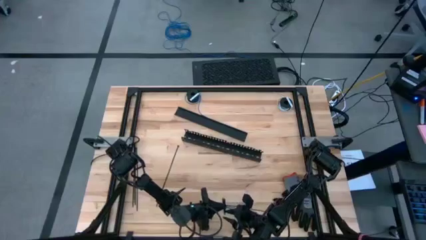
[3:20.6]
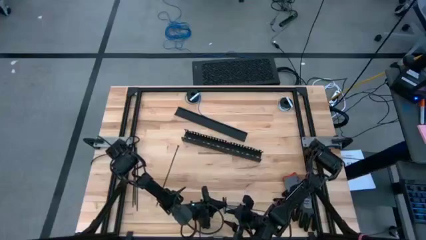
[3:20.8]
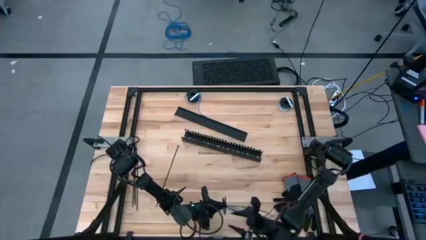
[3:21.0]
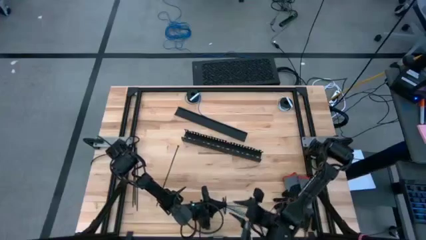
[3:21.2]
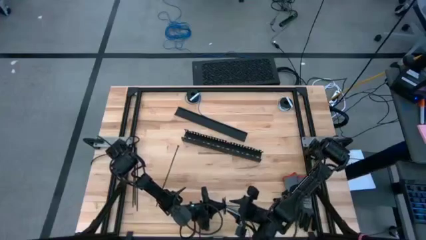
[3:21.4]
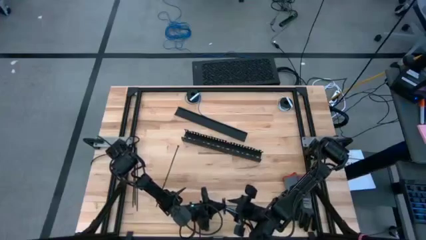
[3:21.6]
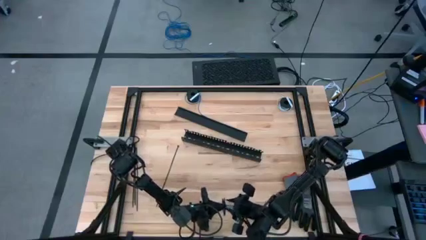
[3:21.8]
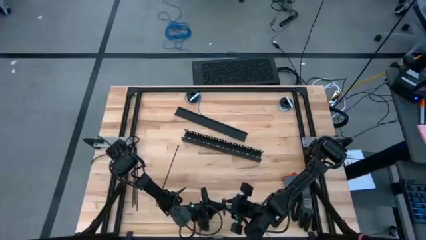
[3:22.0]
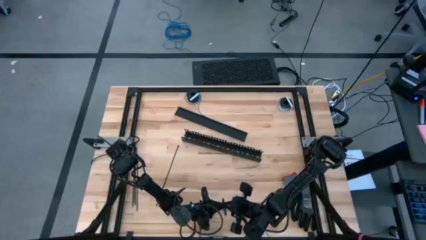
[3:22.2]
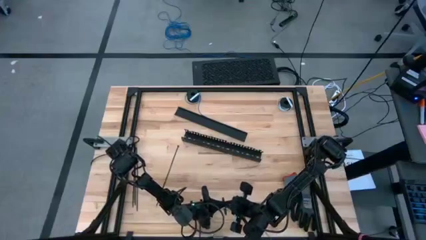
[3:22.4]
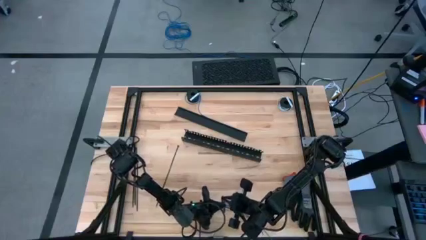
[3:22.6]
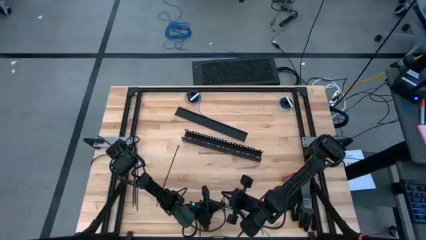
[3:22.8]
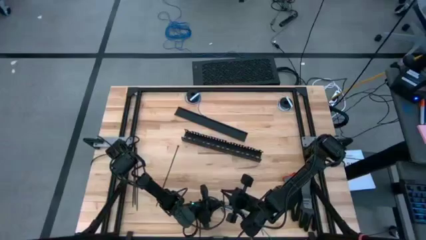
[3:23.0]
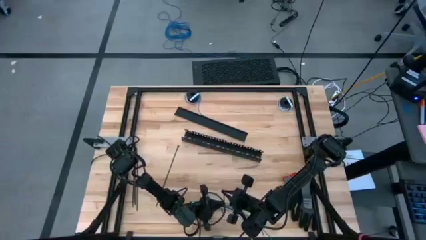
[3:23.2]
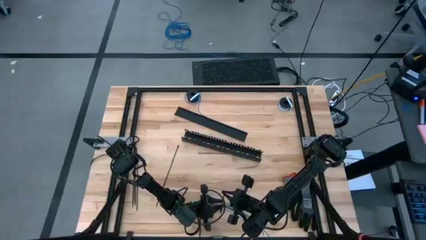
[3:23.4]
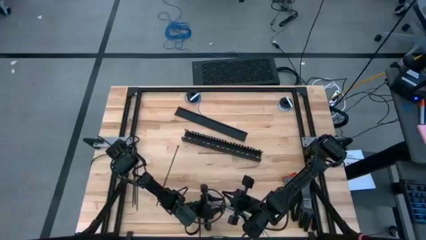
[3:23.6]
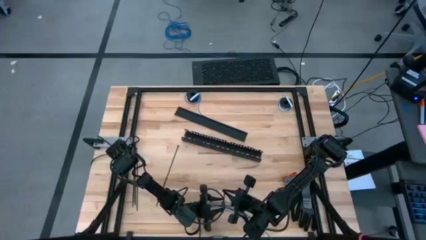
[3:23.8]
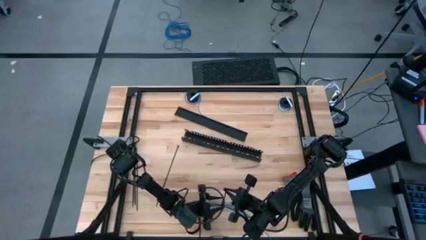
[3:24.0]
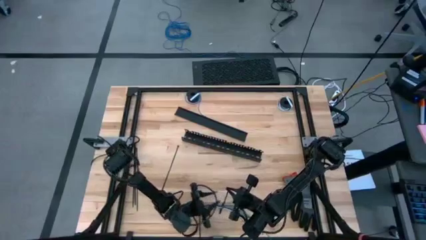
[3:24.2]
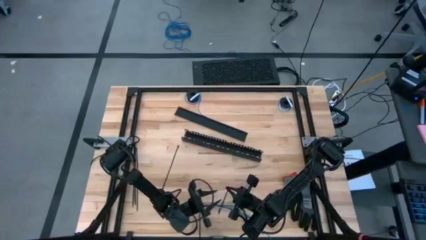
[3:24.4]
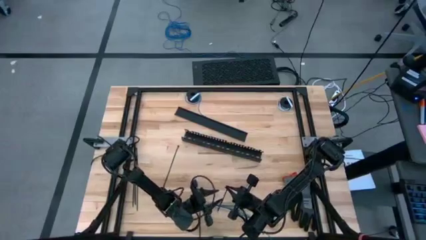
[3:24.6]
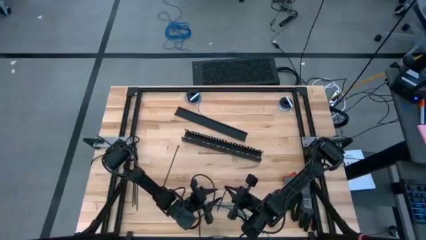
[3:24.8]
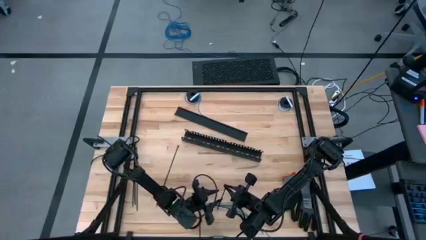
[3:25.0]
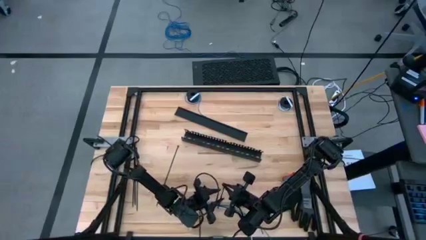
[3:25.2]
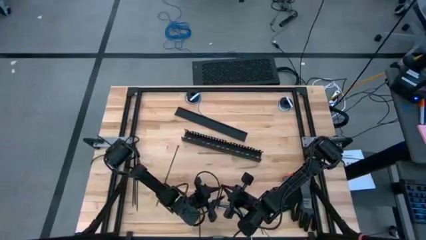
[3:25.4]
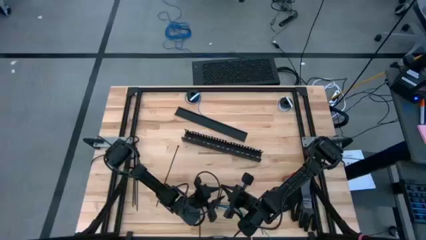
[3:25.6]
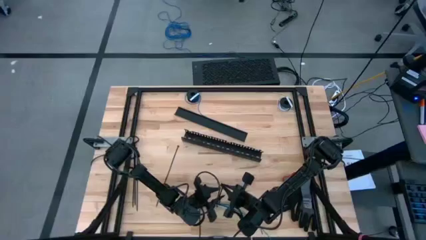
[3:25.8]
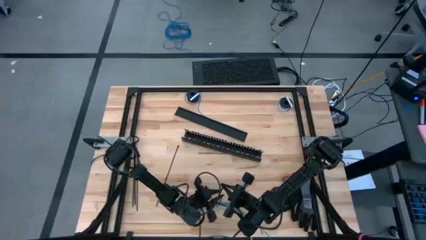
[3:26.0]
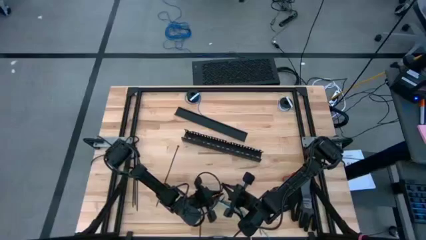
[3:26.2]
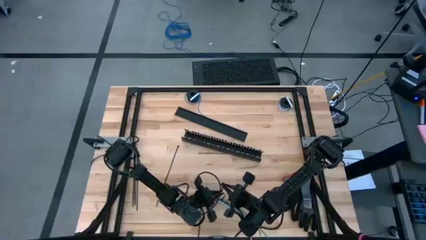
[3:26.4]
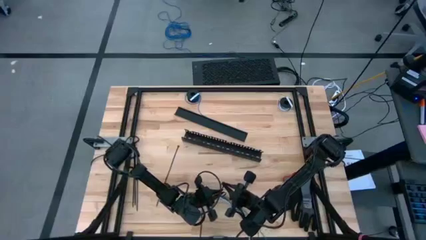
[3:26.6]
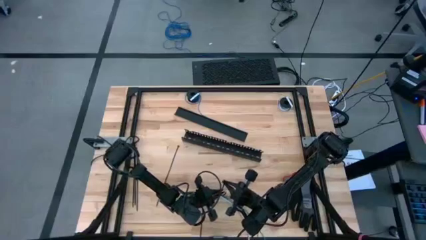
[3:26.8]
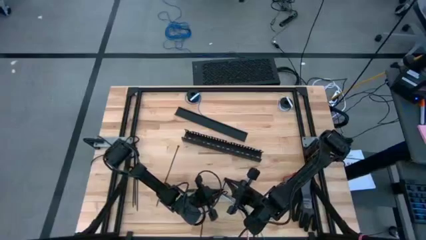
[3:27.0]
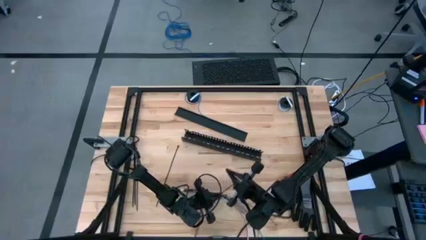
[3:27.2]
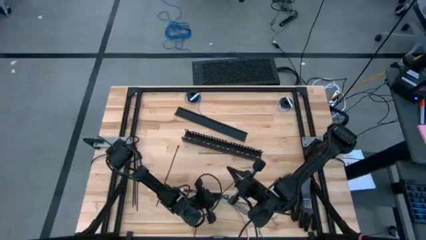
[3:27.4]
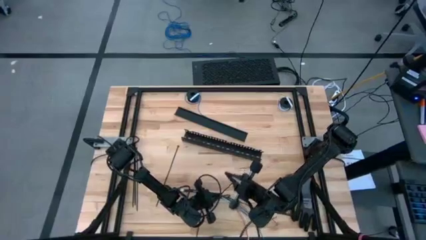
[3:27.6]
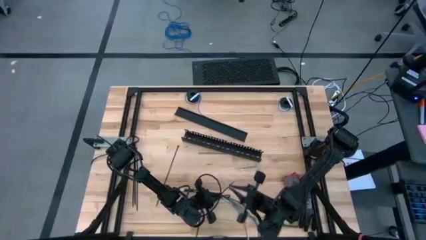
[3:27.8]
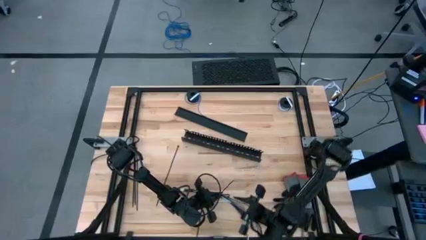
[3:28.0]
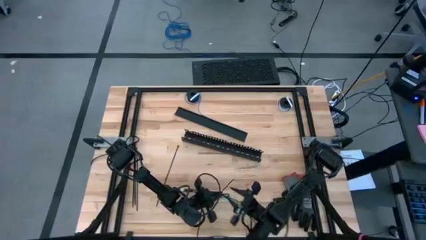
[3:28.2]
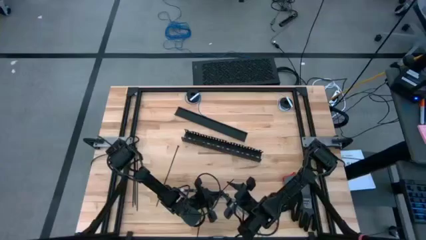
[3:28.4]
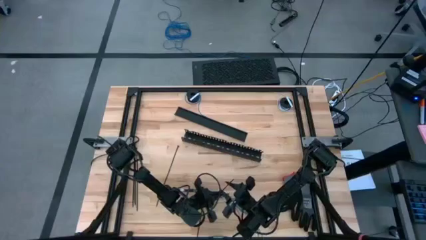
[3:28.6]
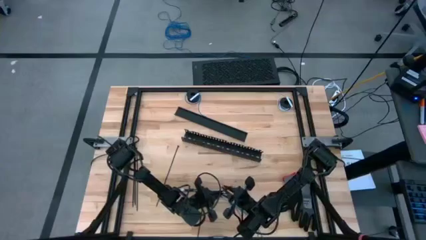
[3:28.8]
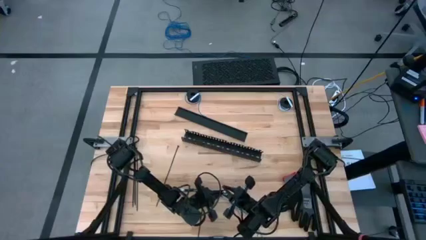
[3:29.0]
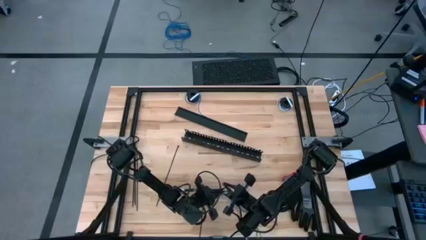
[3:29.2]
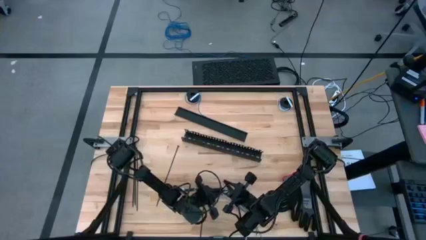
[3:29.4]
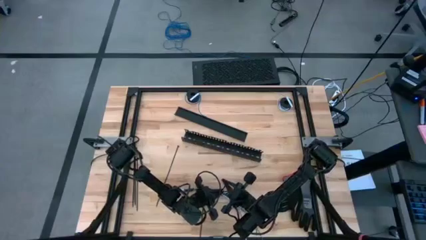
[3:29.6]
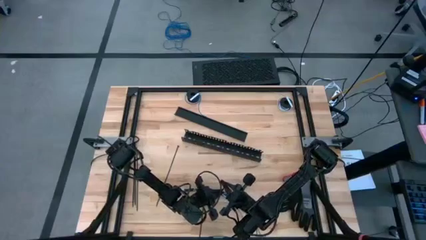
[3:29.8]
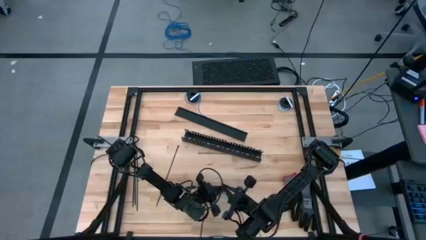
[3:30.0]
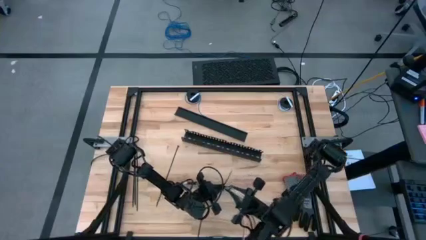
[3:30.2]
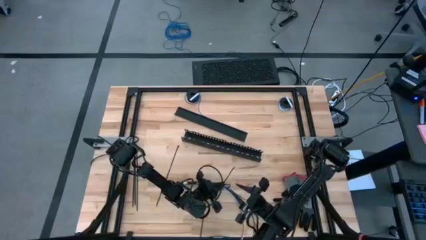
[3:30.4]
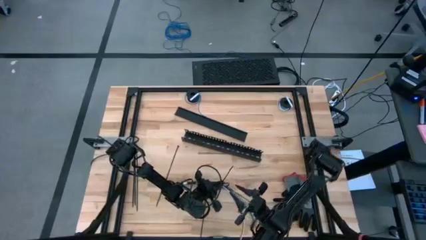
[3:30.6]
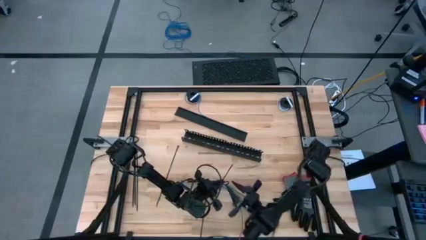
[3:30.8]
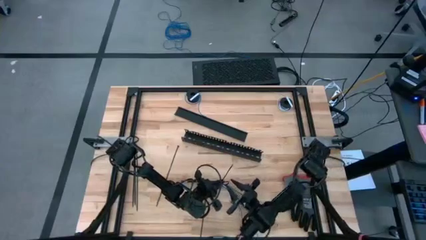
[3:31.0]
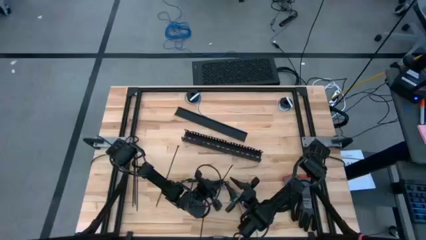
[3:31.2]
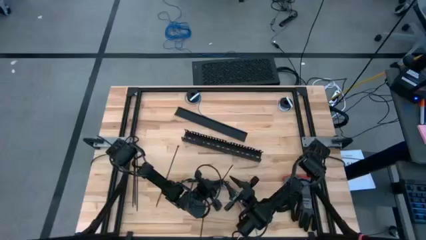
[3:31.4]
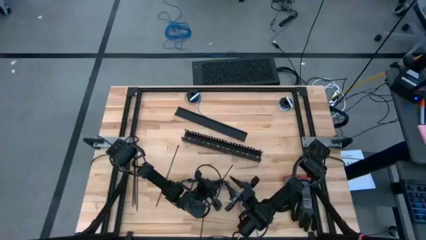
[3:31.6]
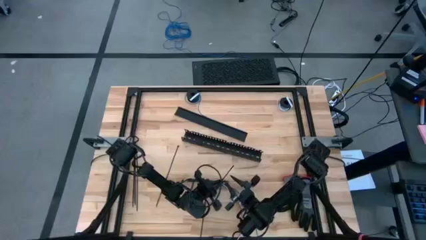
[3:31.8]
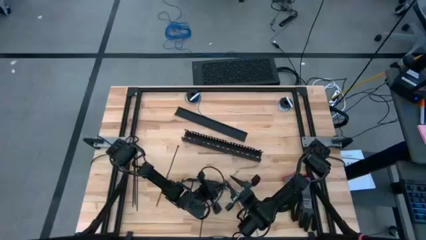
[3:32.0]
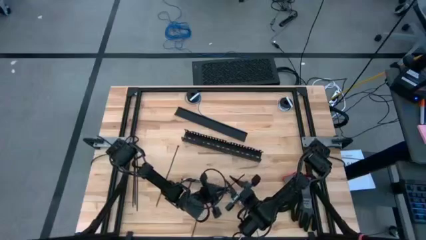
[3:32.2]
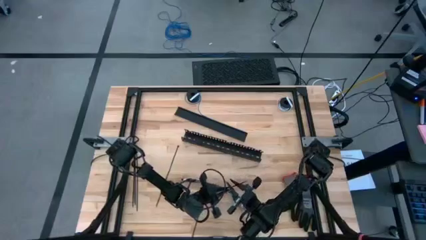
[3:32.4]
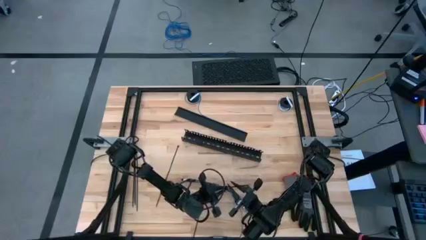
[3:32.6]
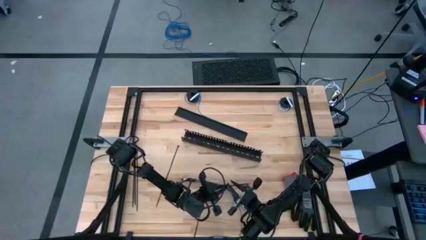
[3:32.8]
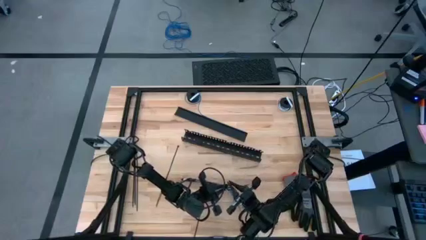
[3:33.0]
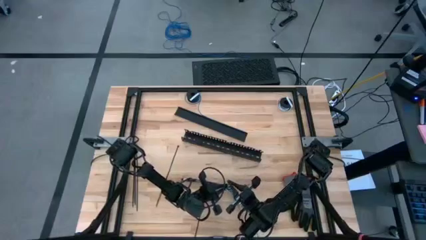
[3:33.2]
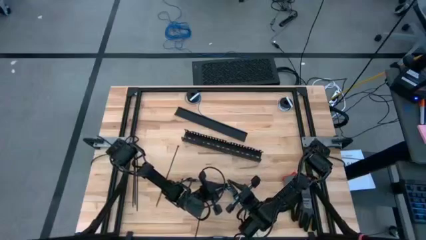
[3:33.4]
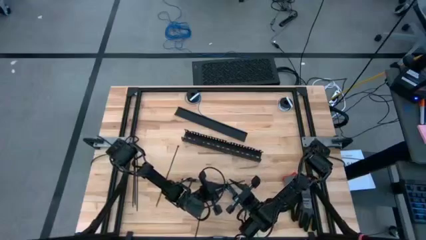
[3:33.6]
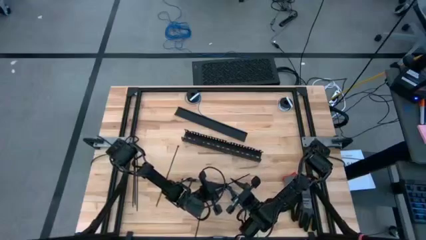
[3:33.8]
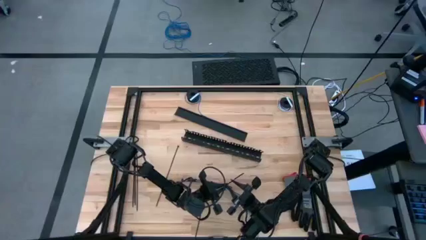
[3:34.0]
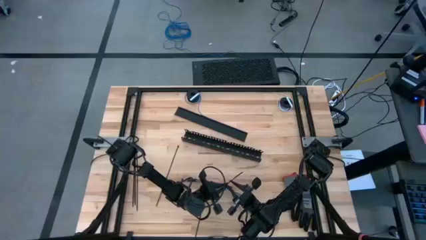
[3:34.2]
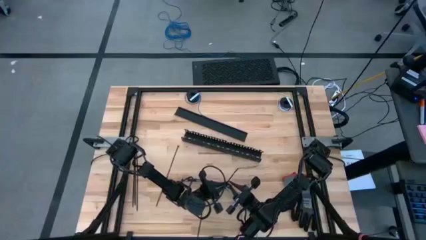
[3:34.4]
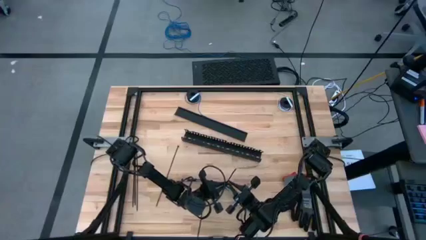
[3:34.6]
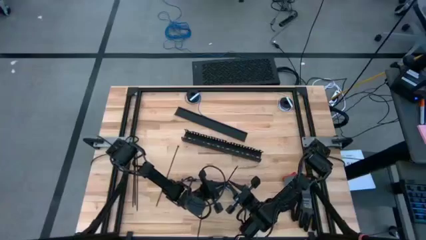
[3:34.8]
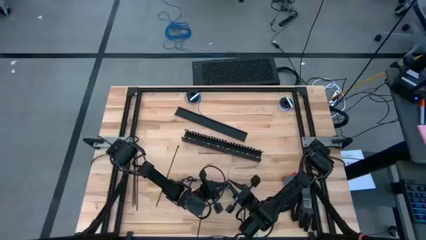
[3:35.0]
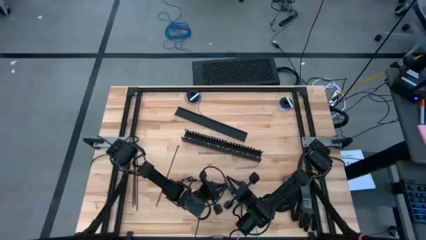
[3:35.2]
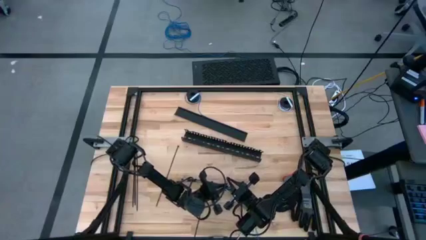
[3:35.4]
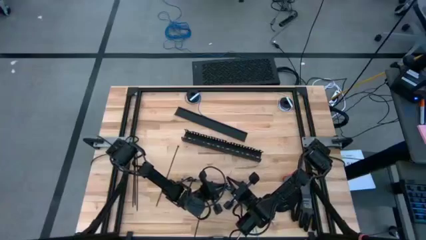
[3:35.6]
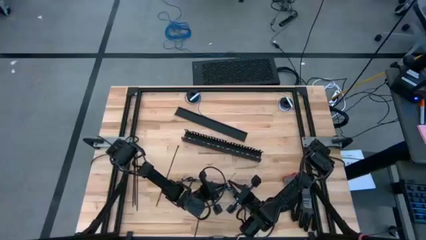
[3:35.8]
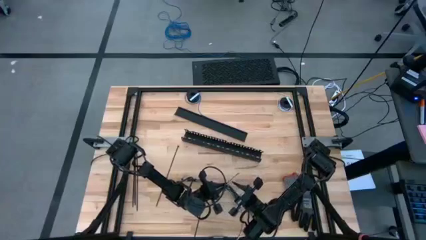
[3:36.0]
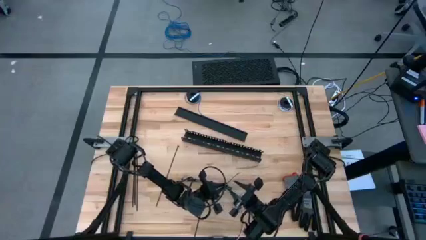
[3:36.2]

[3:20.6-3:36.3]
Task: Ziptie cables
Wrap the cable wires with the black zip tie
